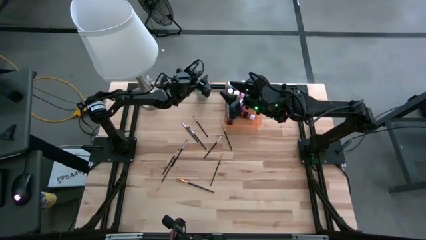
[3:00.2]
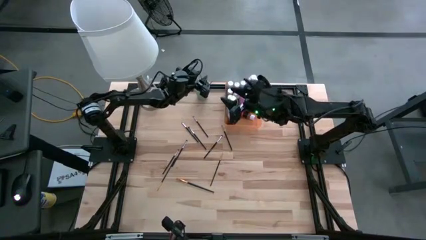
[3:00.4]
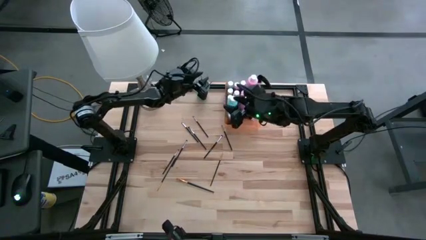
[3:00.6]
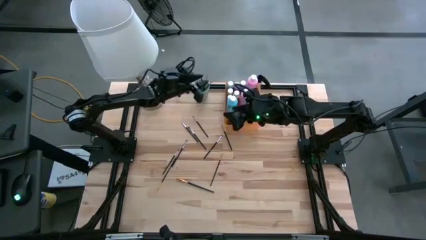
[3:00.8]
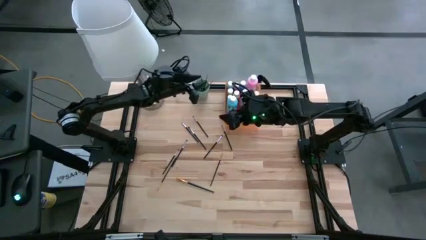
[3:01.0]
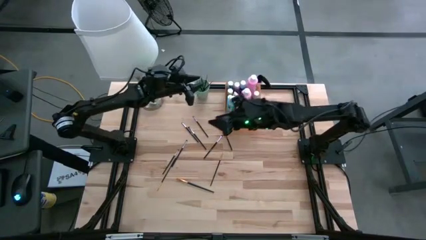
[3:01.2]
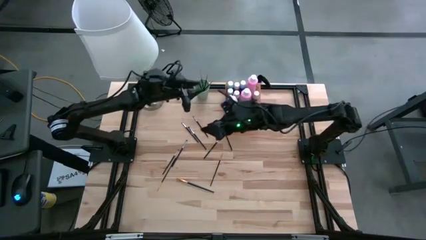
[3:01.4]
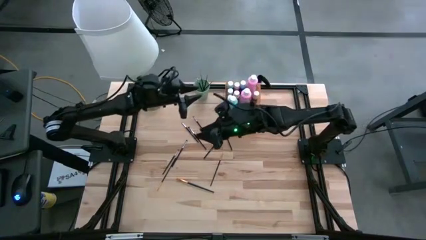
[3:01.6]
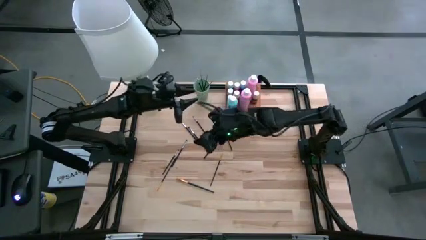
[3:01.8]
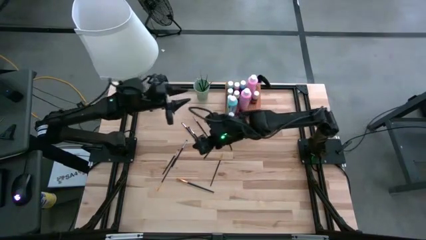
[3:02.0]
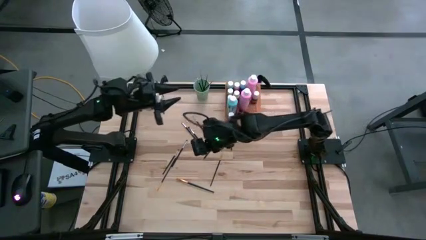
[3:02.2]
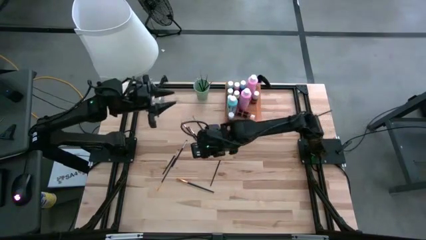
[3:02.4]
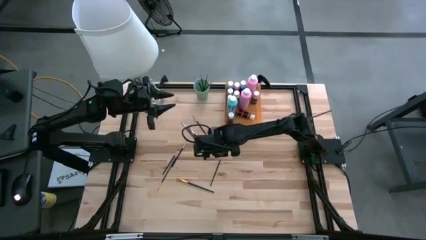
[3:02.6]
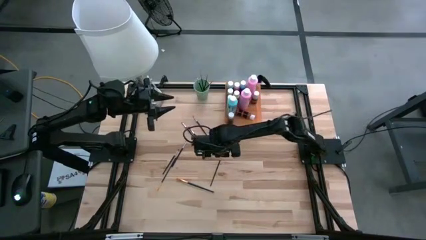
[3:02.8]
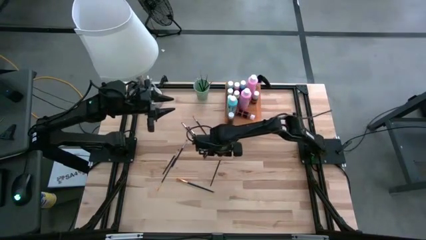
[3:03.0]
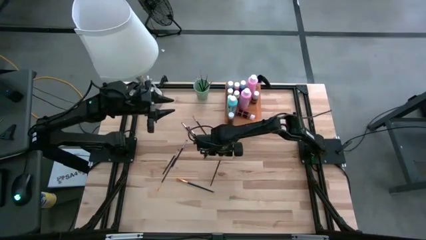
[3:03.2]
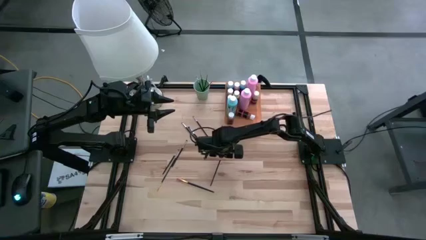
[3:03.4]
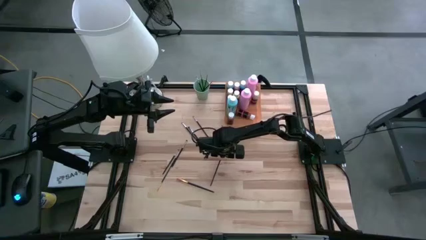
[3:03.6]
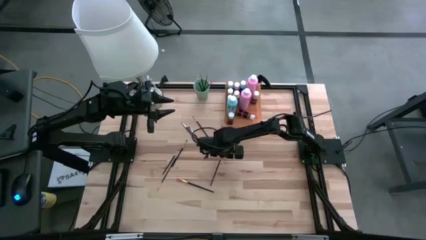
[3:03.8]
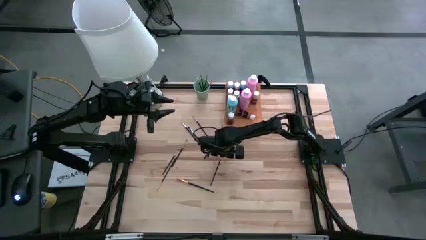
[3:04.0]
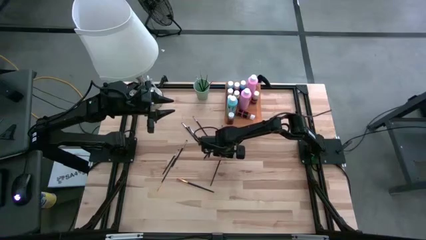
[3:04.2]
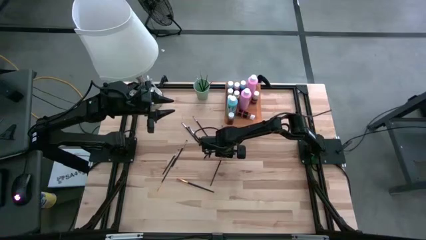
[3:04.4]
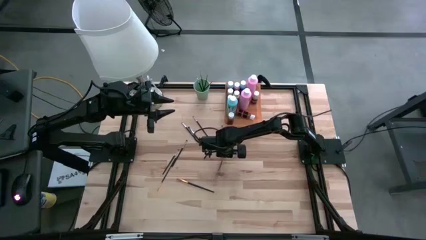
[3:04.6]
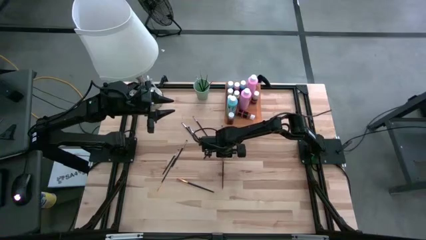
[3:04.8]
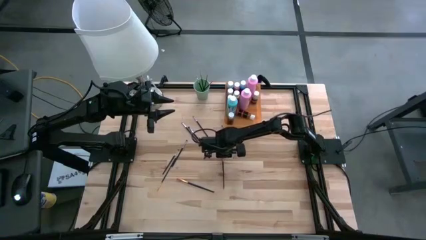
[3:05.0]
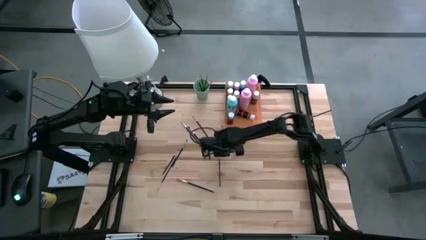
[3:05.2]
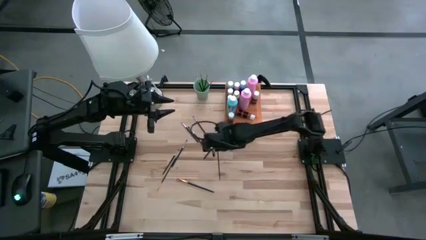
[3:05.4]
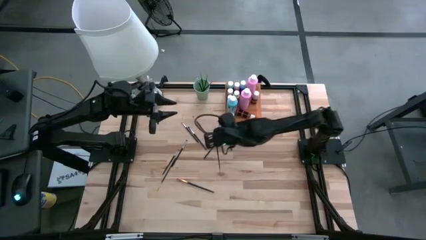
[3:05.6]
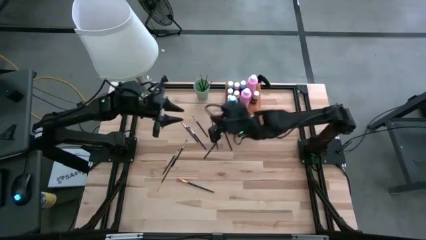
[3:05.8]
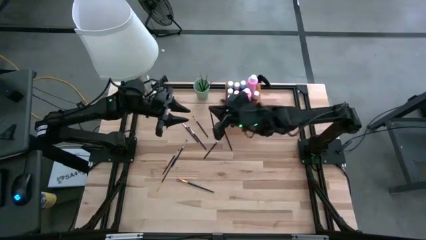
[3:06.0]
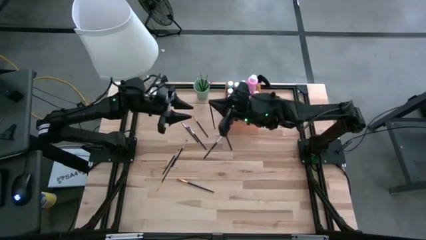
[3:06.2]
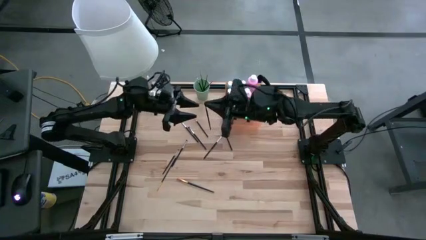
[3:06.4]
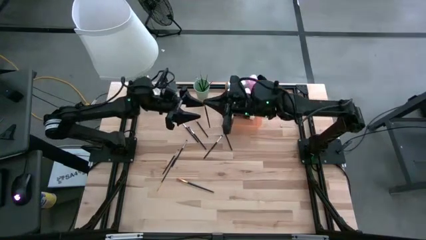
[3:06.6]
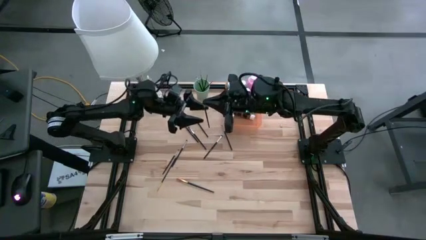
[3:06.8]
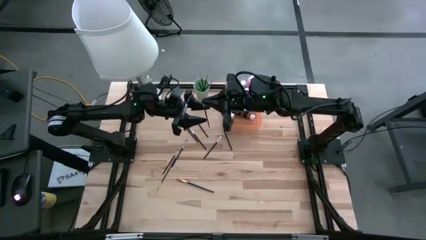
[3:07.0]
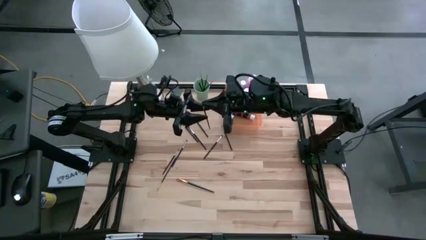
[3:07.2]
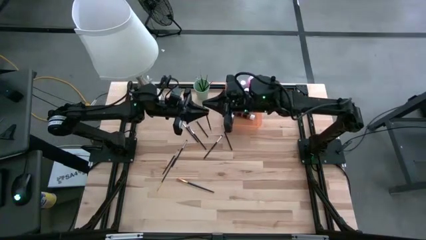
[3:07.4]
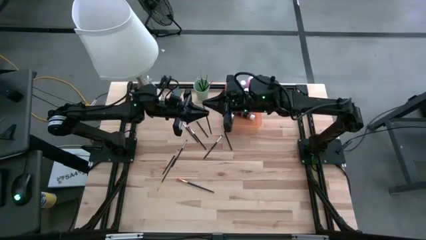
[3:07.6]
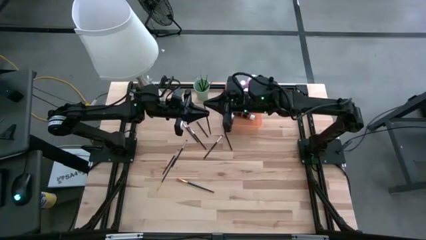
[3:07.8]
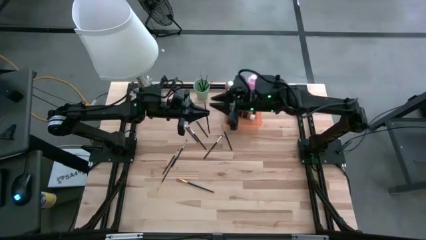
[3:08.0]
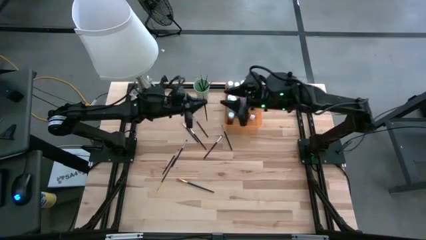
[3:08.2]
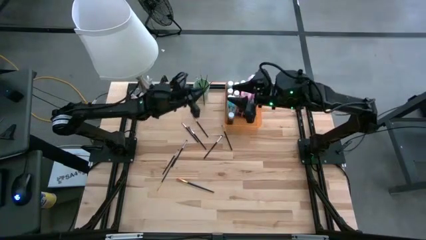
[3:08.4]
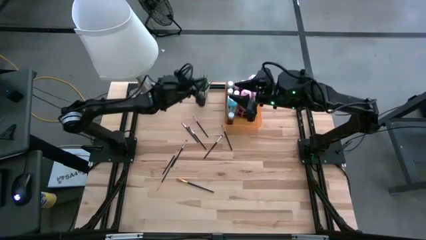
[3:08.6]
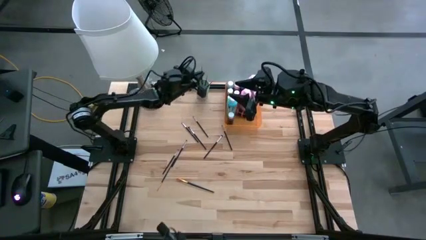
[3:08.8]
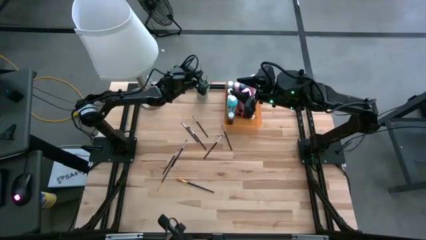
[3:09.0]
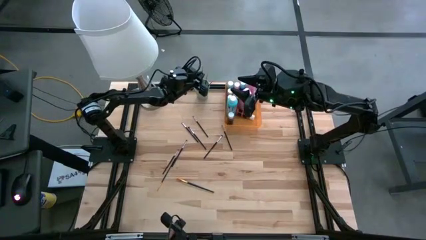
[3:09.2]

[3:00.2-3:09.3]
Task: Pick & Place Paint Supplies
Put the yellow paint brush into the green cup
